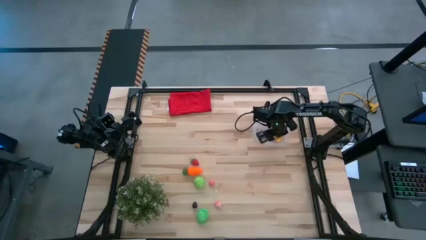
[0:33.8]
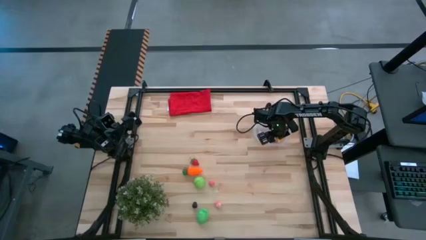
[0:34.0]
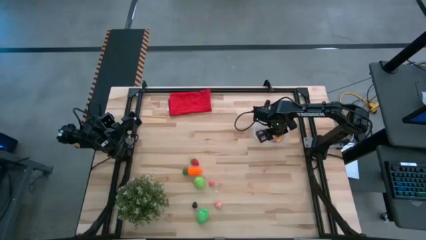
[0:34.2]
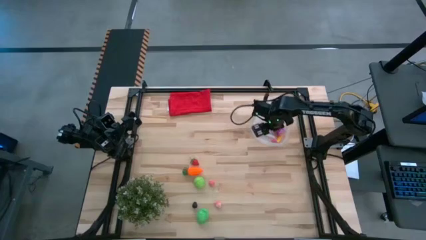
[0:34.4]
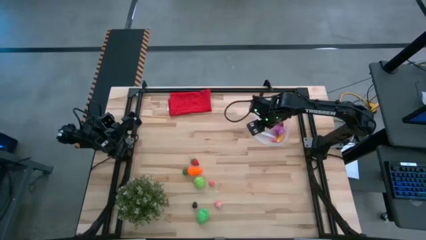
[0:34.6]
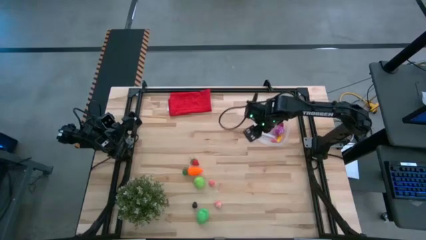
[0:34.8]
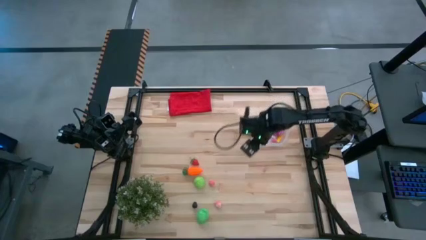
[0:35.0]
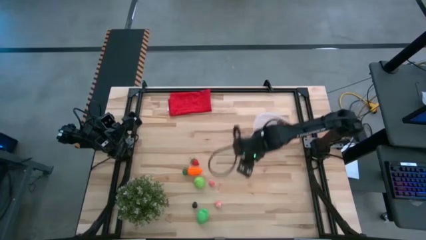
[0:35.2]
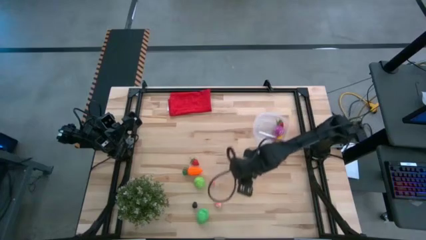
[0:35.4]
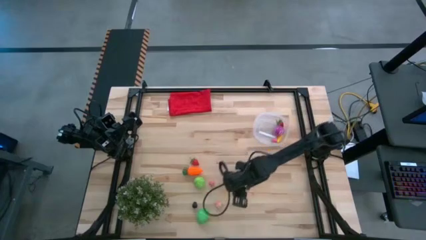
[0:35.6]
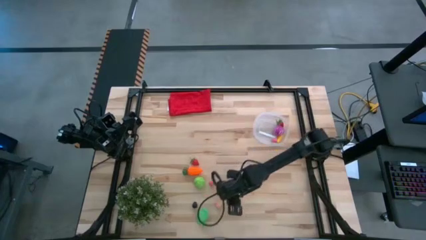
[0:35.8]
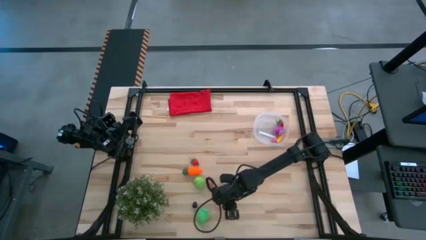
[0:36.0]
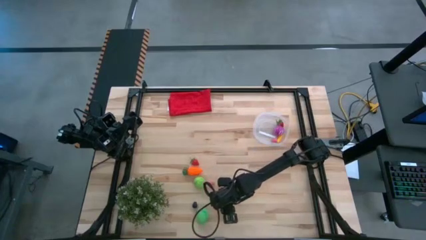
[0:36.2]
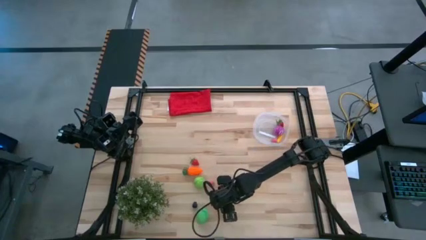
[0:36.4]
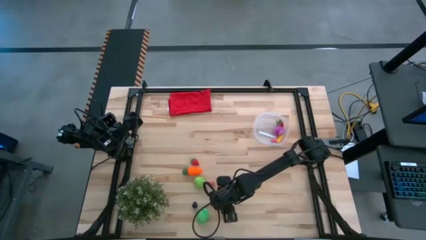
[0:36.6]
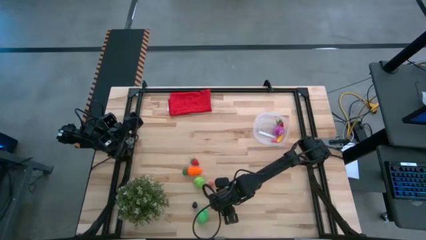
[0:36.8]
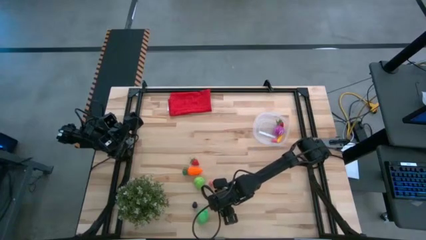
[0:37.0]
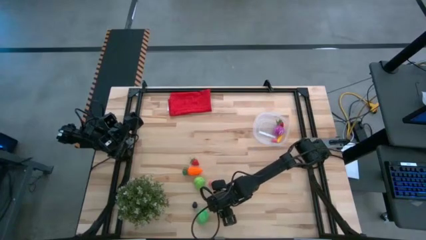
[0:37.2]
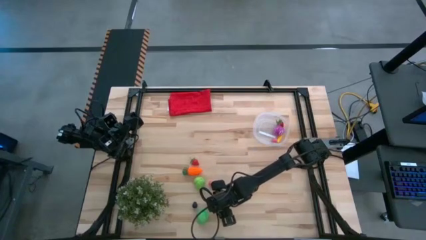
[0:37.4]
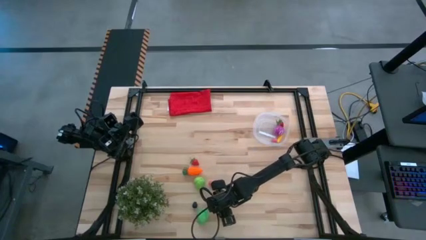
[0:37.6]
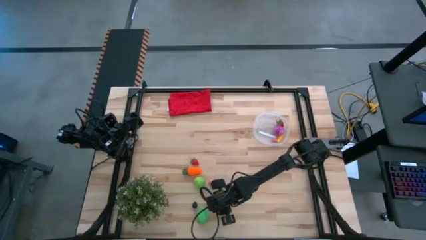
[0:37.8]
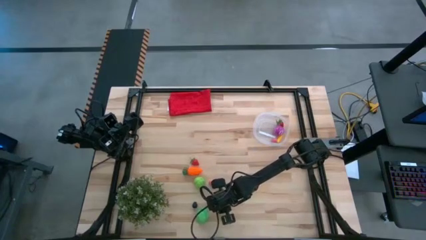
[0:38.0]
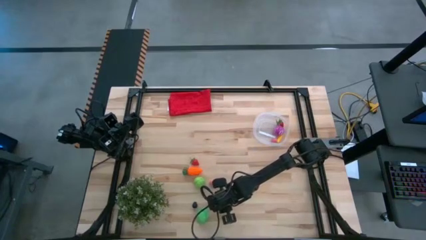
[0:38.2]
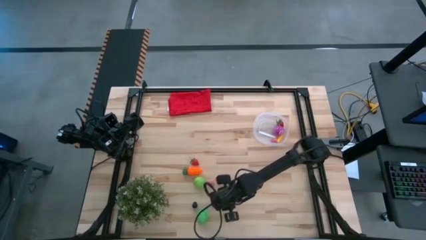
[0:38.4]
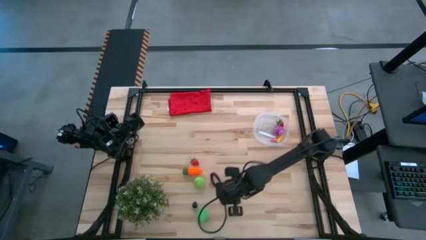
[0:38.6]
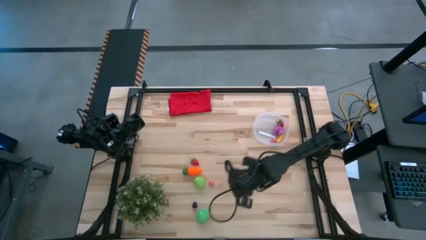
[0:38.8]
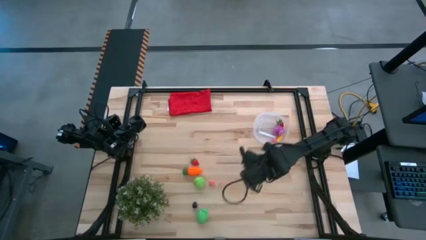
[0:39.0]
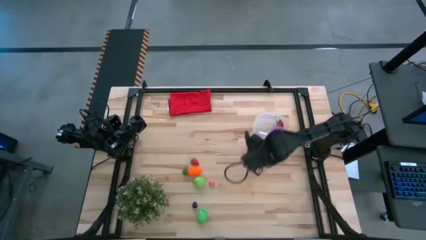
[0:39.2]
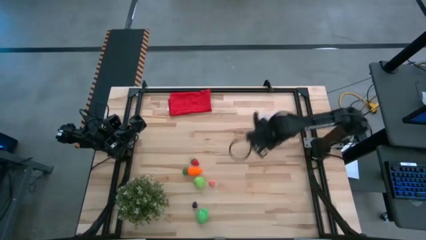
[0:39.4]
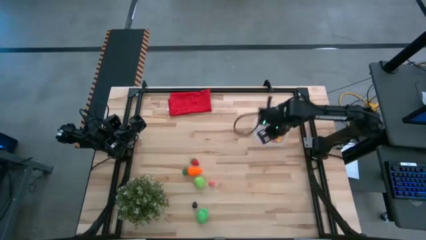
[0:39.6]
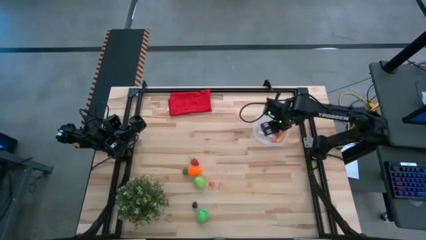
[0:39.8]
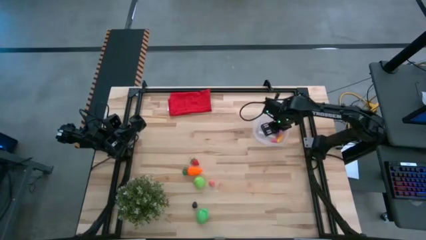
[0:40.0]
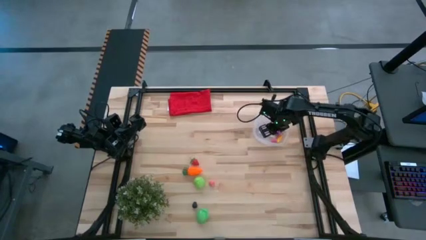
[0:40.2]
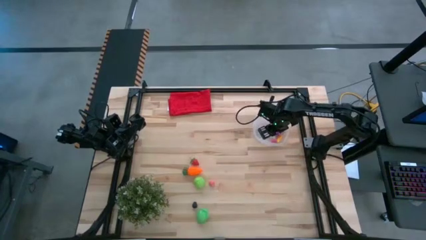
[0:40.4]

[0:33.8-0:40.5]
Task: Pick and placing Produce into tupperware
Put the bottom pink peach into the transparent container

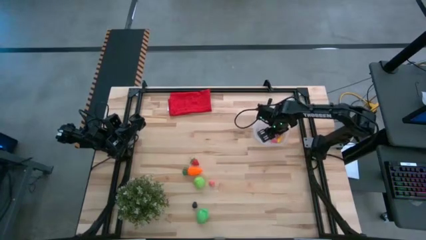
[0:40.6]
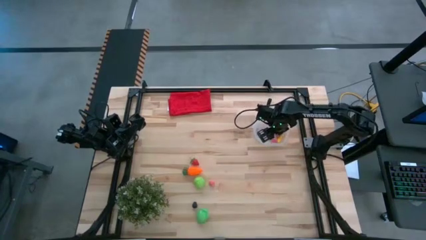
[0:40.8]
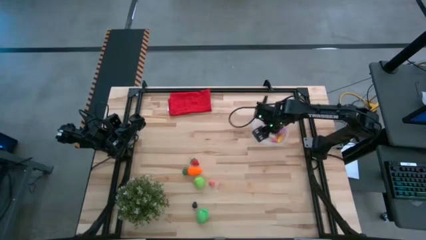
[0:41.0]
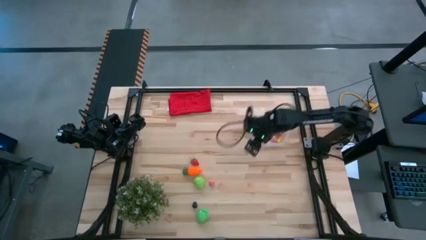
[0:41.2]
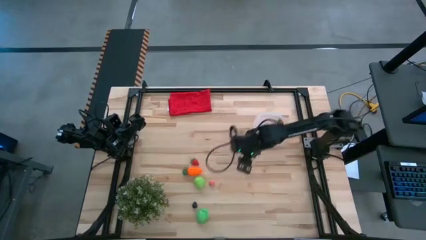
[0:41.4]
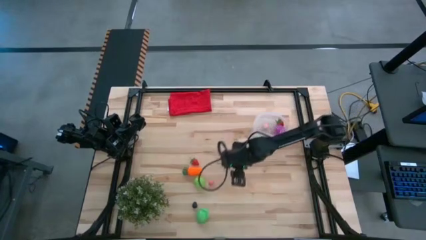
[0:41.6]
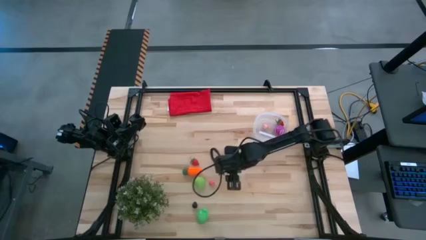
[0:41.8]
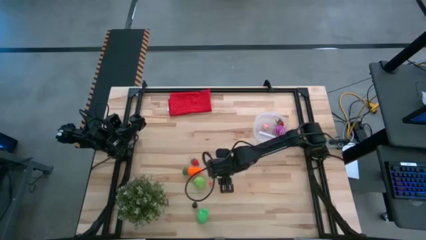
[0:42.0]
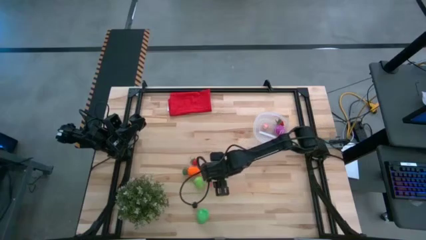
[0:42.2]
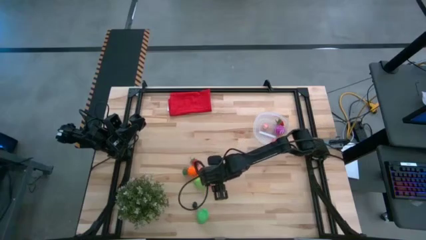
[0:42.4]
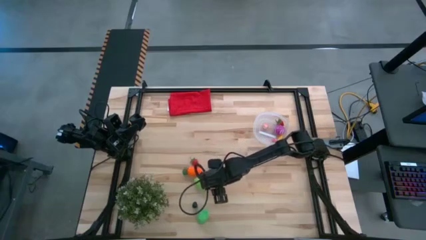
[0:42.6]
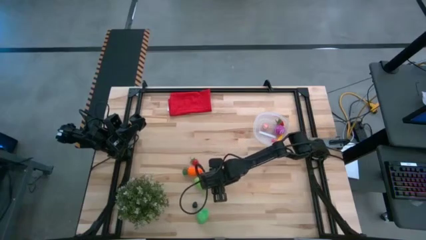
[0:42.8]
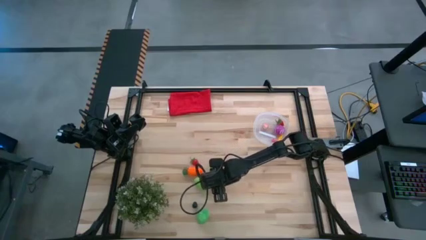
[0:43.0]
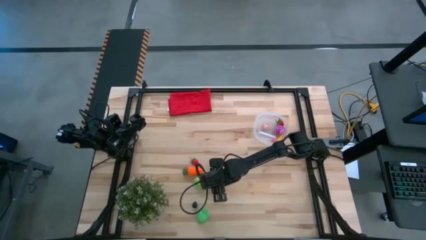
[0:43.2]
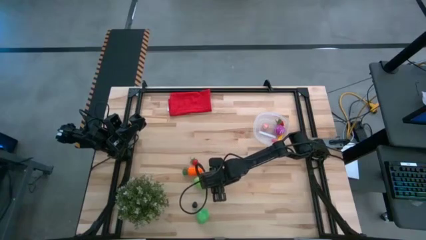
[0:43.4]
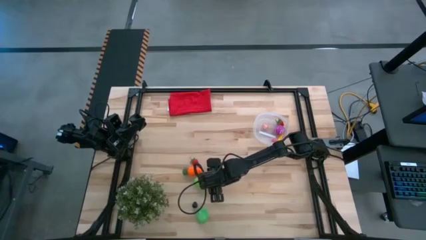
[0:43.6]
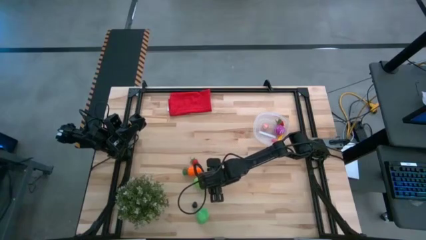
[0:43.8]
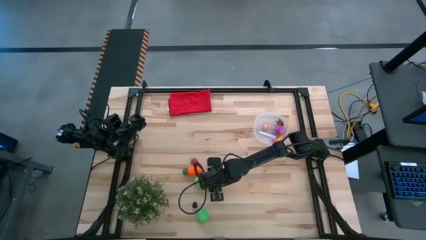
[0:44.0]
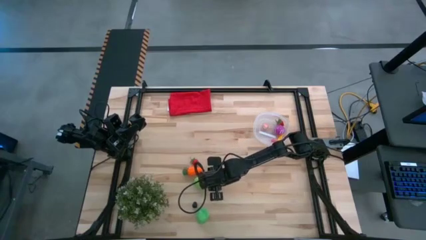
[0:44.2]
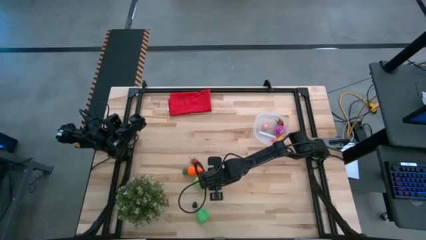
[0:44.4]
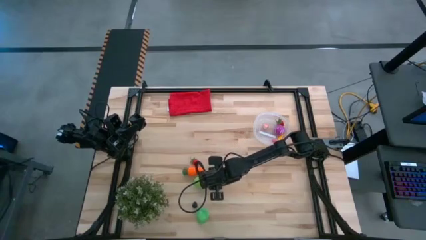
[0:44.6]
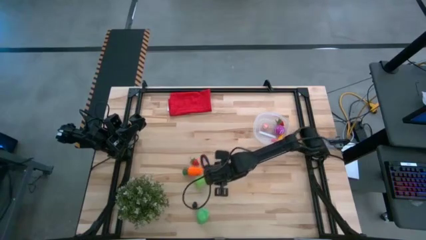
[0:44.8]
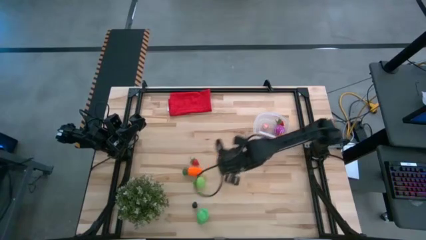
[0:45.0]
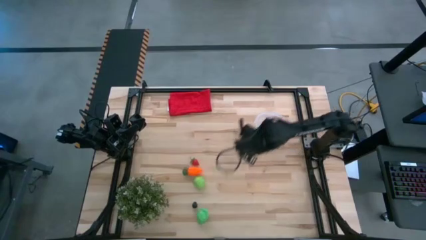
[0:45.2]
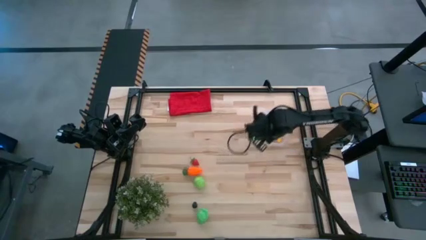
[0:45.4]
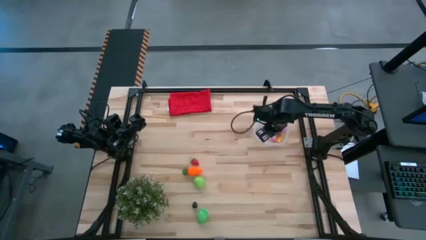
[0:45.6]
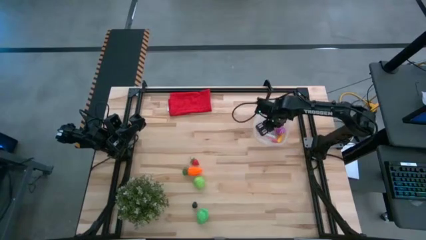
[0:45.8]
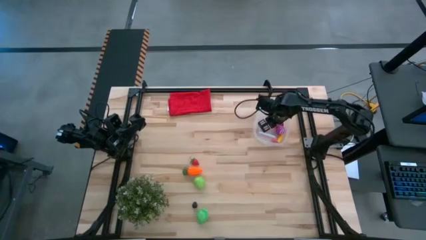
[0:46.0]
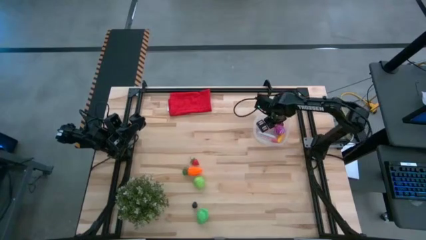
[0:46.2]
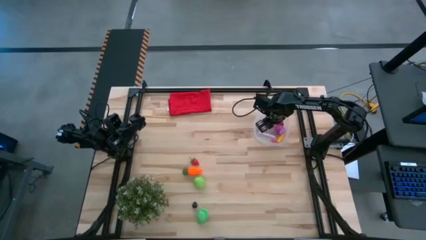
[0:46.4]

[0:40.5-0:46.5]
Put the pink peach into the transparent container

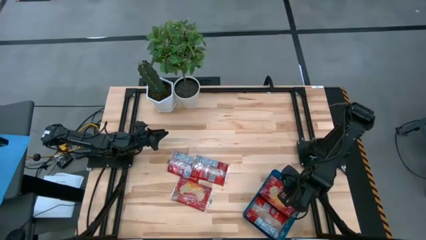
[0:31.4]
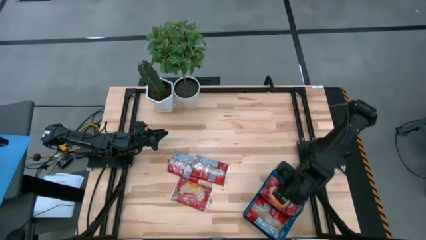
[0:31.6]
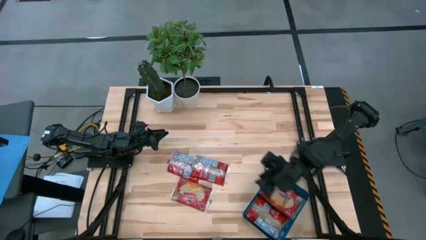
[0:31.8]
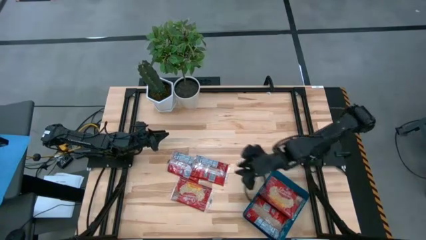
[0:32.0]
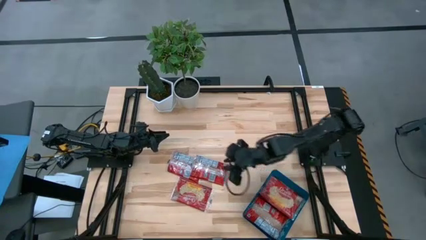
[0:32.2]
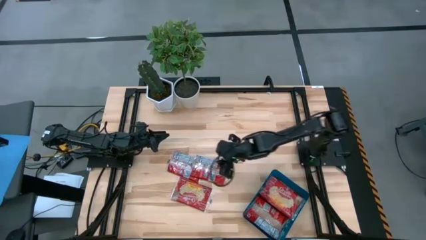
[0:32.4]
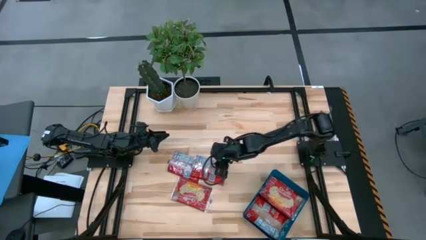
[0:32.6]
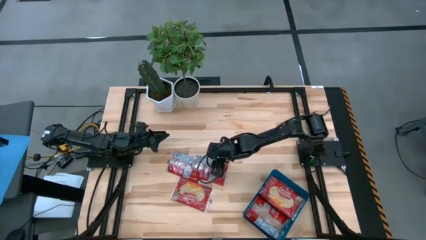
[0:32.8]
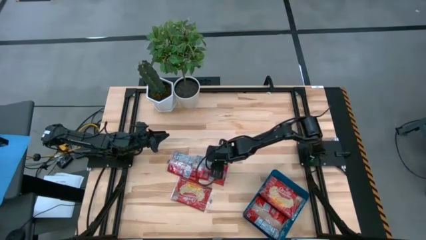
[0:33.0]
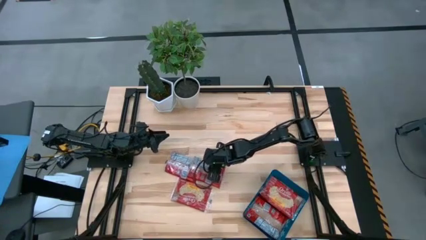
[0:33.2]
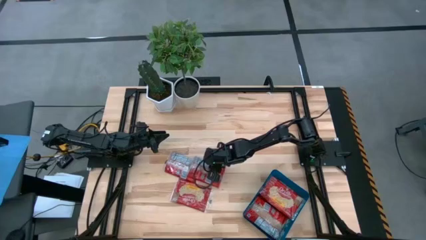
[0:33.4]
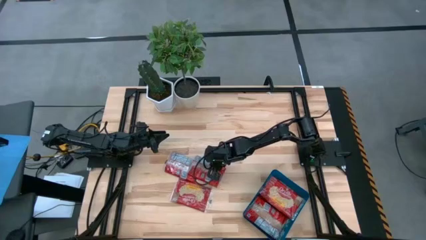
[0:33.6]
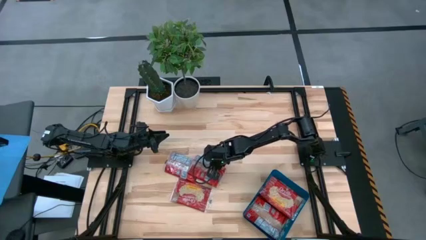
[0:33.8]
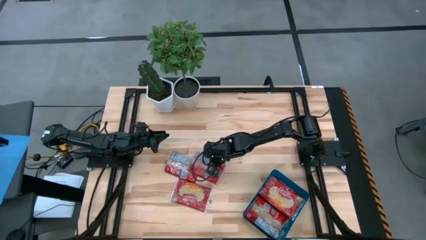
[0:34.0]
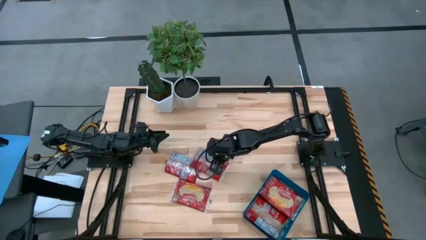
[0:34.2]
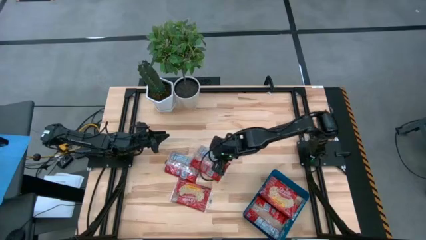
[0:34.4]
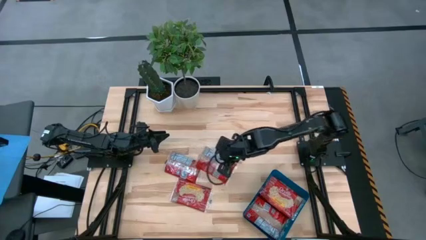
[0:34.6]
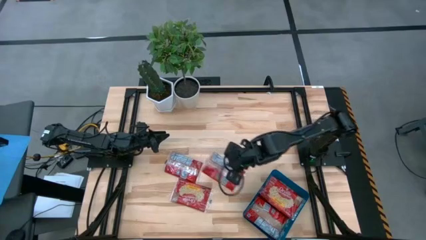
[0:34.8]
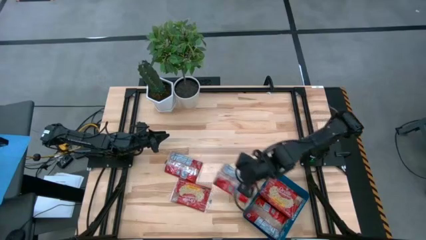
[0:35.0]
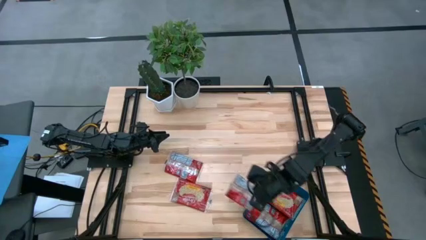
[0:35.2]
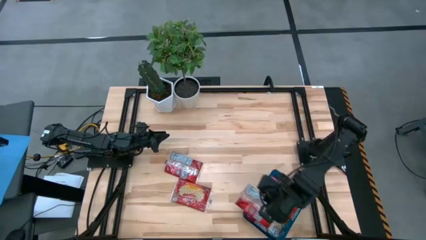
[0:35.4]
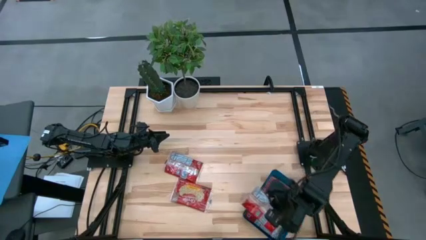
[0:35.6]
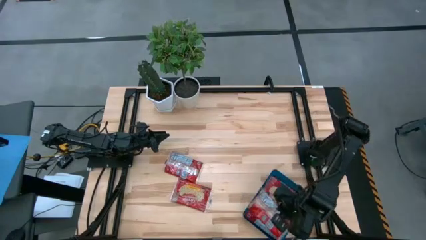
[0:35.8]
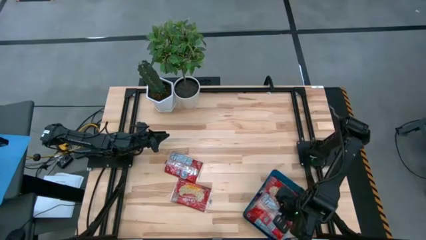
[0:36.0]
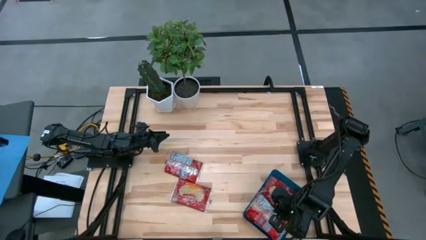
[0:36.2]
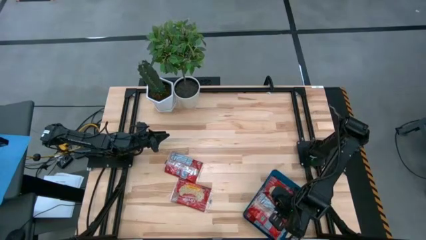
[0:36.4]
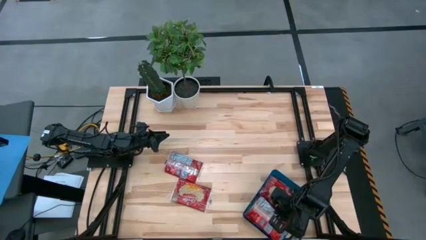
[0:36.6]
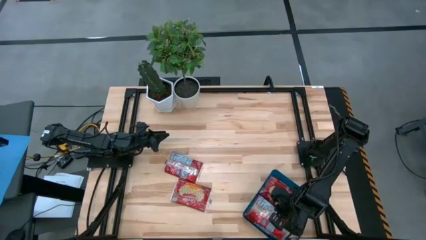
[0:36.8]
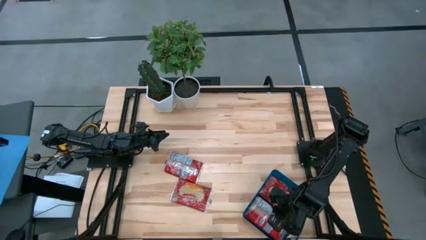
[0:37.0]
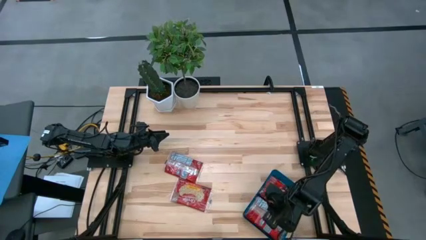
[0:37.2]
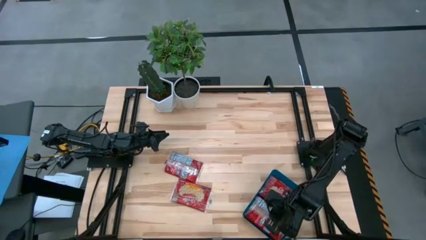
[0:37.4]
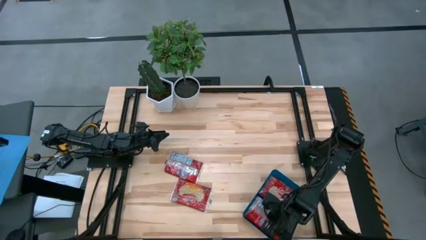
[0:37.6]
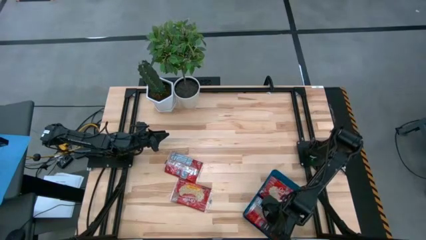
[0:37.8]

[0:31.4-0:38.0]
Task: Sort popcorn bags into baskets
Put the red popcorn bag into the blue bin
